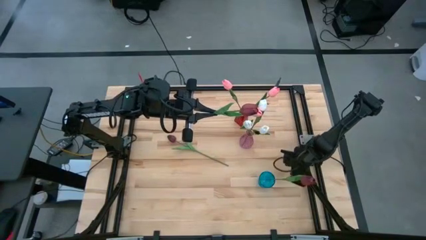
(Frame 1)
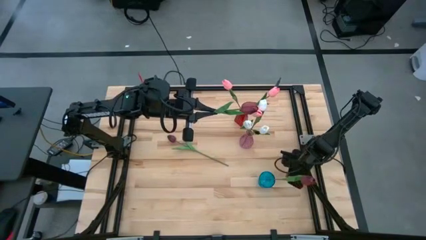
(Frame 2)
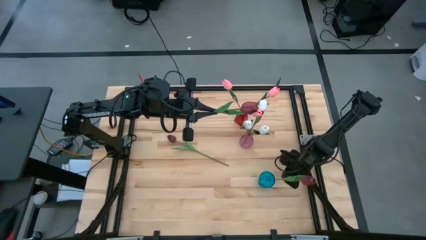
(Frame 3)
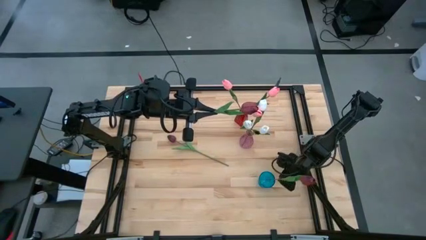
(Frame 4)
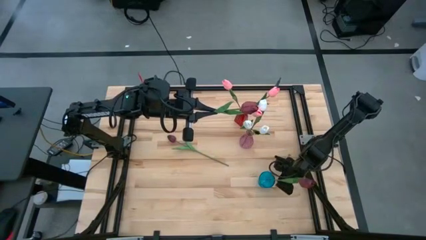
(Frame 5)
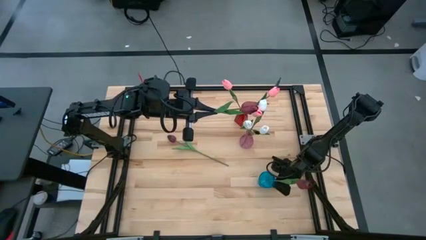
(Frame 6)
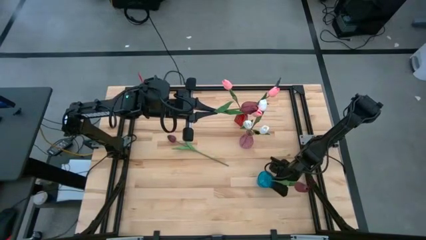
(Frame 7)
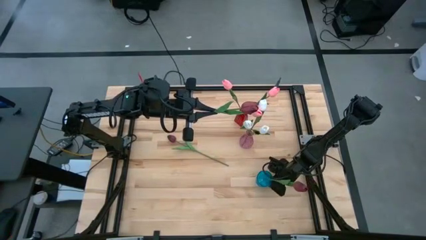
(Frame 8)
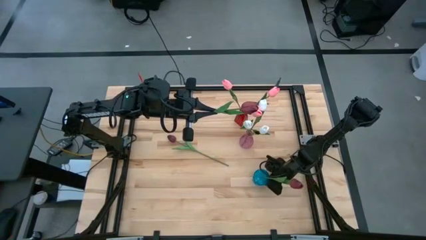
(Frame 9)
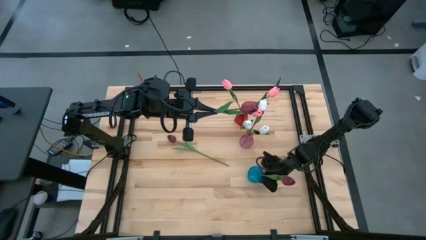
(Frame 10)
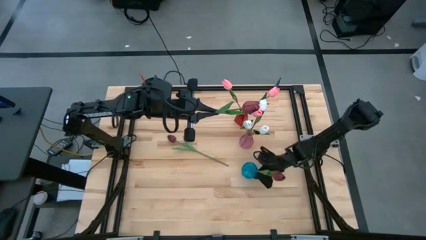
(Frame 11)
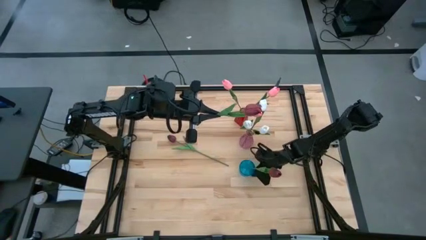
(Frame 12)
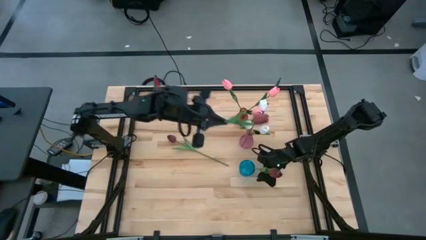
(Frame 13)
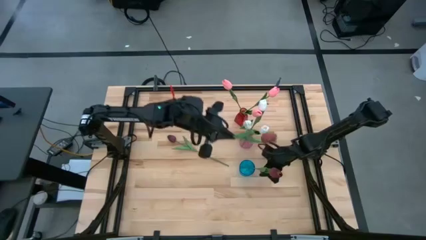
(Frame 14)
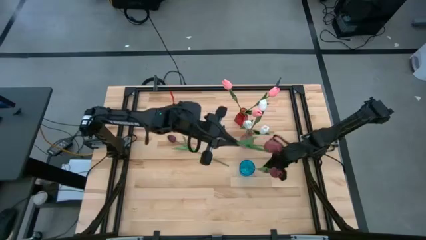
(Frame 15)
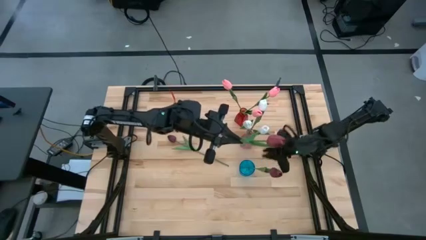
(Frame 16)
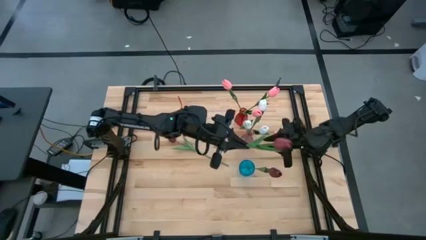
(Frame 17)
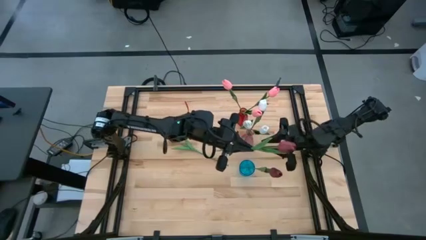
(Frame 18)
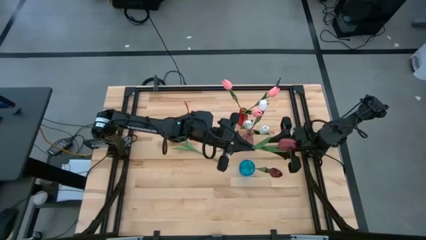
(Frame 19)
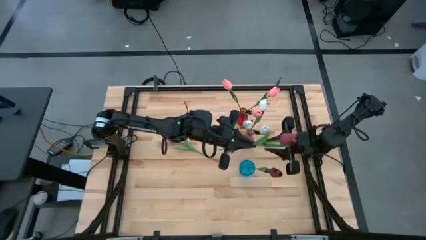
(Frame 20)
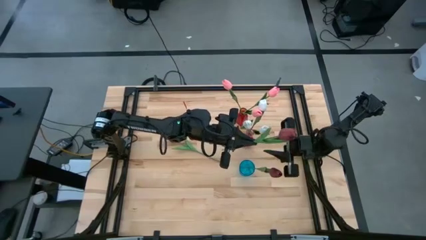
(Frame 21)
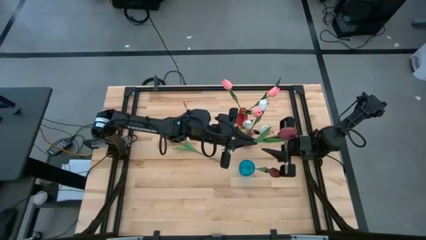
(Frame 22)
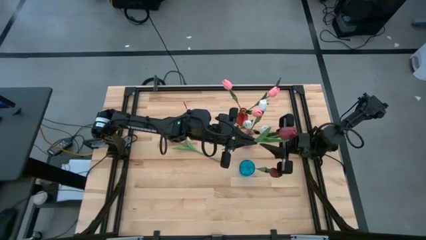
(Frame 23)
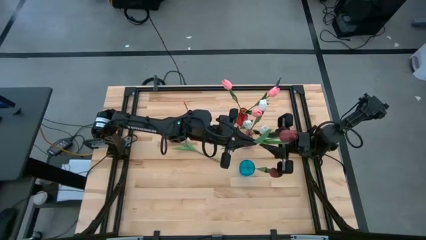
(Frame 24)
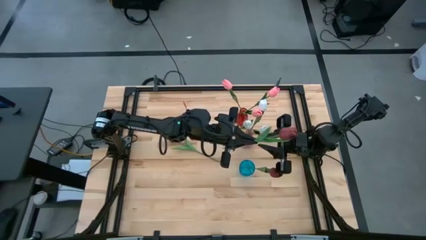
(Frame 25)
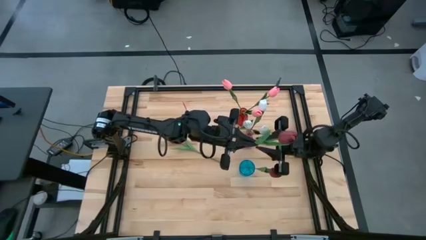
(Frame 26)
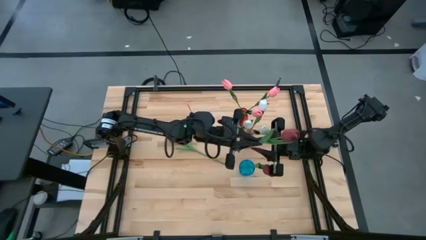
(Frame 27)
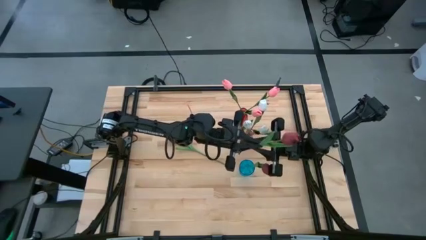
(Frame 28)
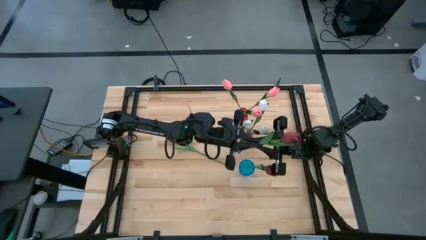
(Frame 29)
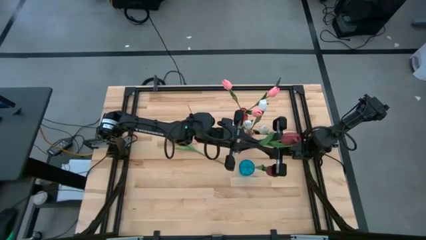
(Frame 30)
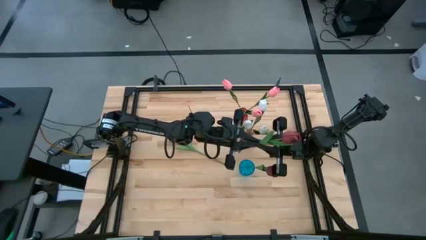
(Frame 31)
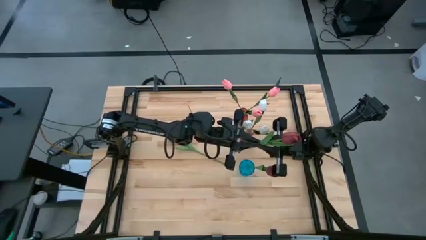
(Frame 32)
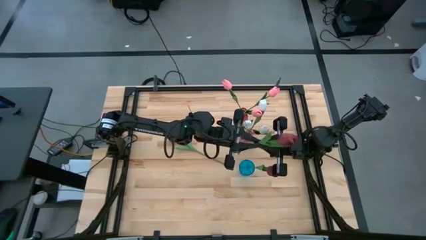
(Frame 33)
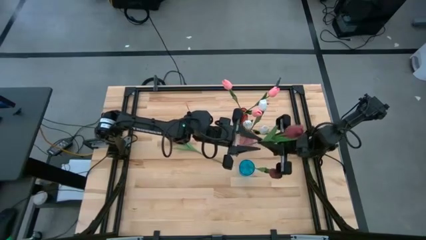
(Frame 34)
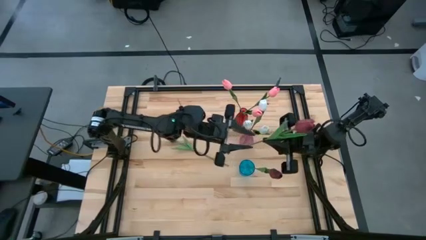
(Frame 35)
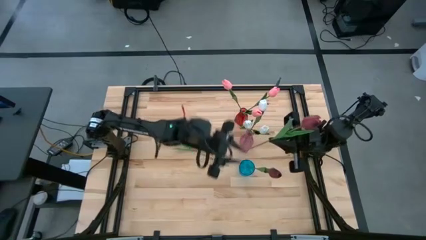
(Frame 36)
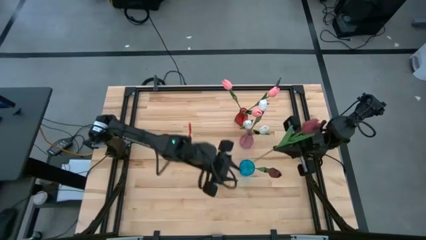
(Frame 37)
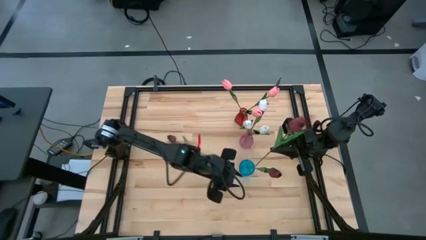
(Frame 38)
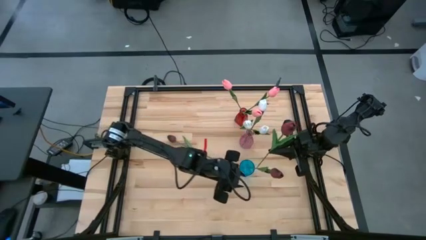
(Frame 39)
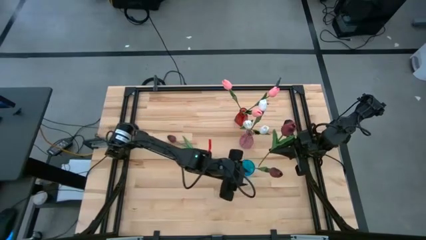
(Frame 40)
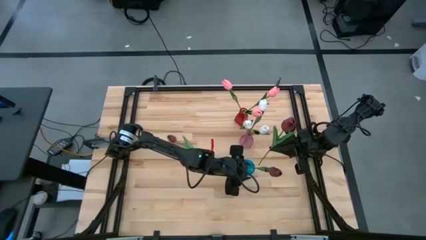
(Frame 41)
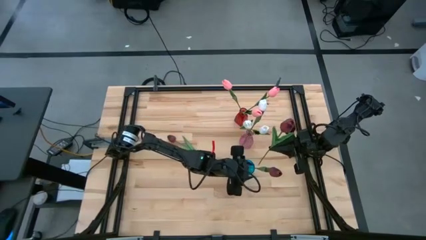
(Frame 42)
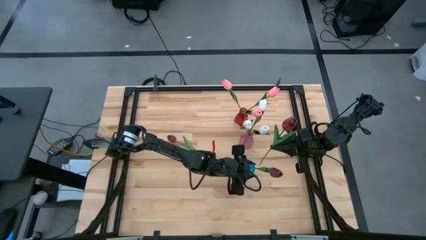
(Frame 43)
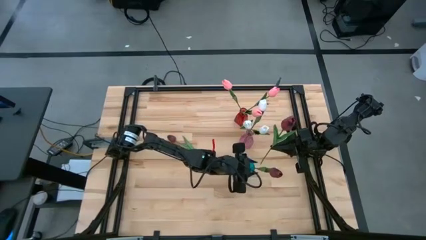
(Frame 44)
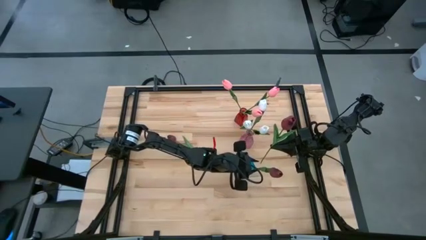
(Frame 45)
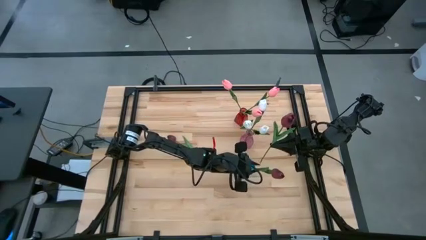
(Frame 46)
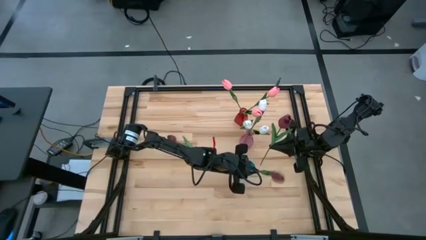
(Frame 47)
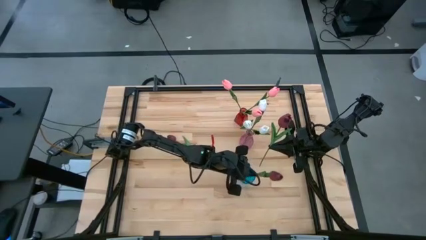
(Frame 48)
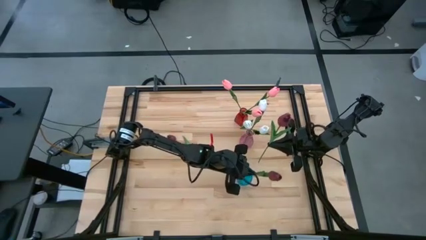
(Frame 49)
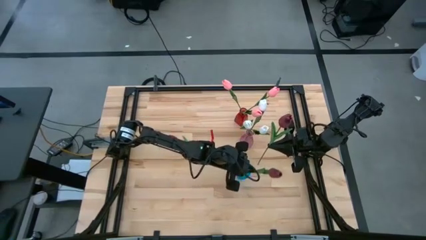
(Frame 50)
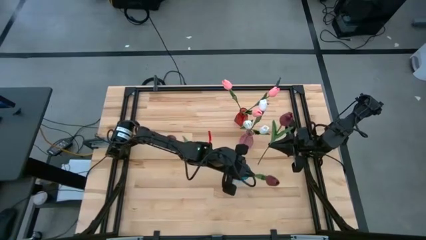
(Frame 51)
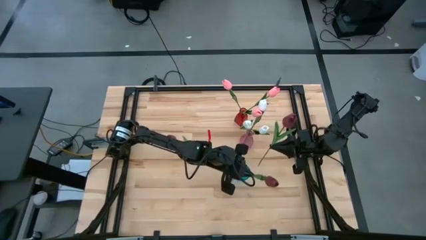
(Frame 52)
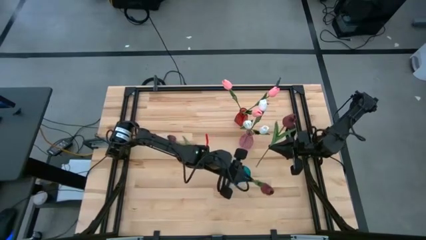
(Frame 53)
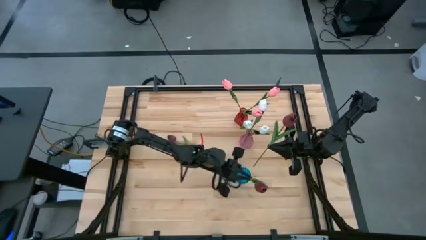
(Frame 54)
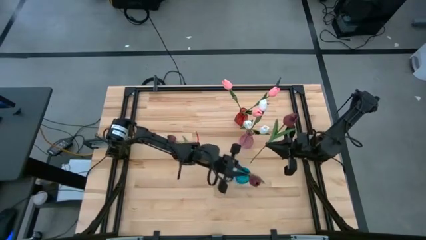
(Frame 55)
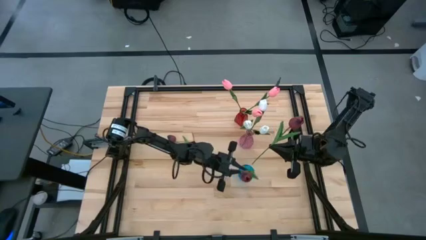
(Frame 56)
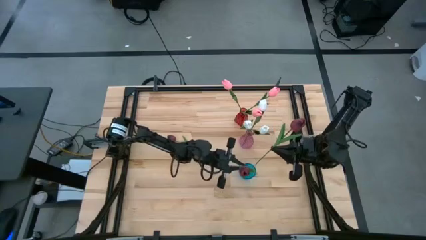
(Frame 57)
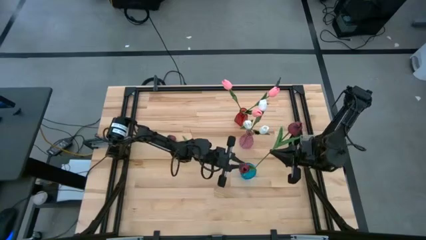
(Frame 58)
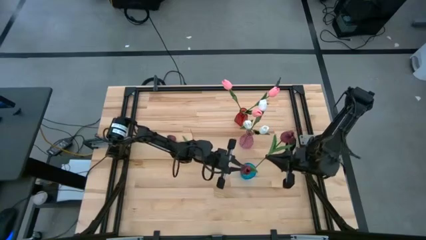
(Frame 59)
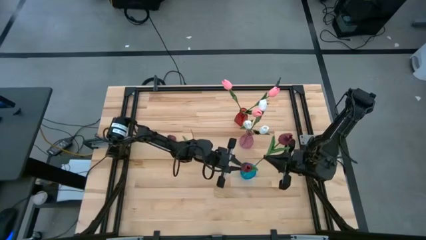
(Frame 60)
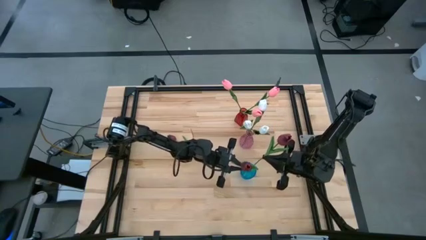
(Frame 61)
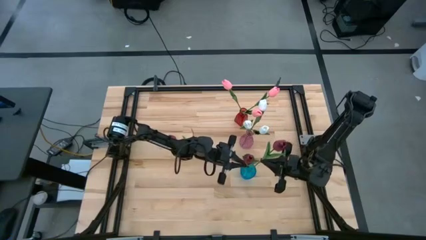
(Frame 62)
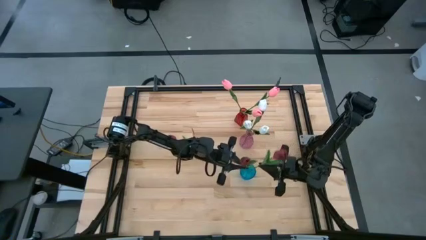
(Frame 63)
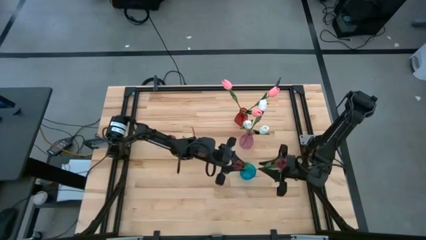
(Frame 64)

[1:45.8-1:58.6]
Task: Sort flowers into vase by color
Put the right red tulip into the blue vase

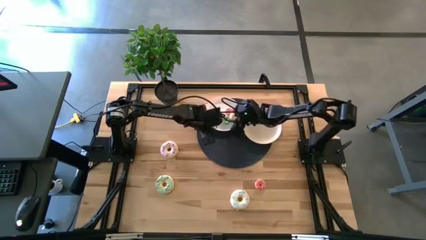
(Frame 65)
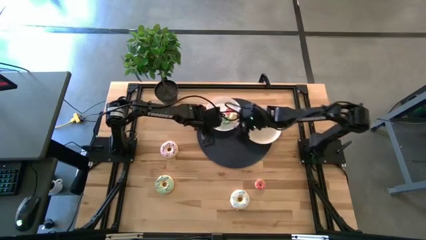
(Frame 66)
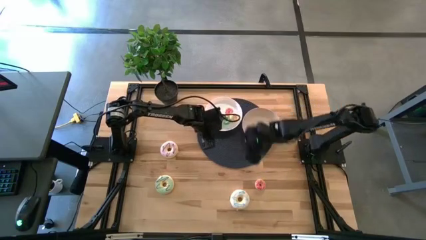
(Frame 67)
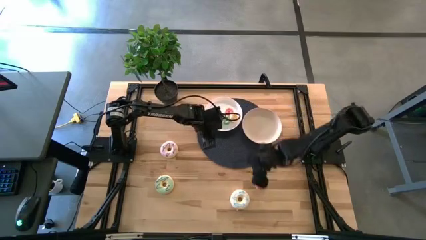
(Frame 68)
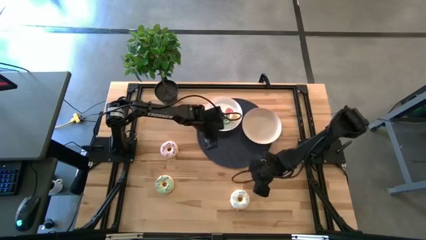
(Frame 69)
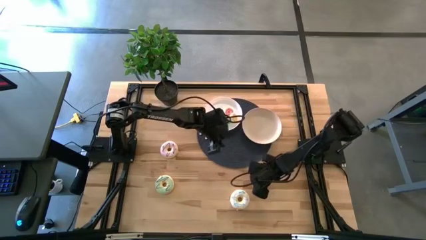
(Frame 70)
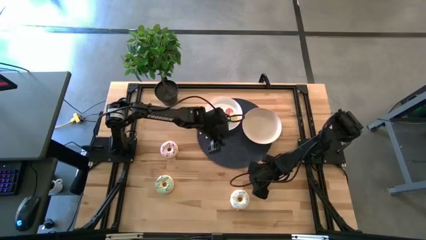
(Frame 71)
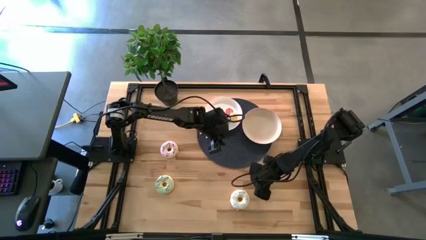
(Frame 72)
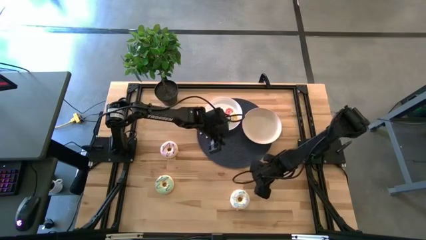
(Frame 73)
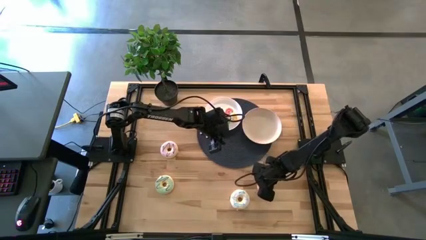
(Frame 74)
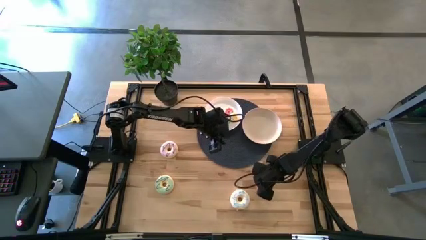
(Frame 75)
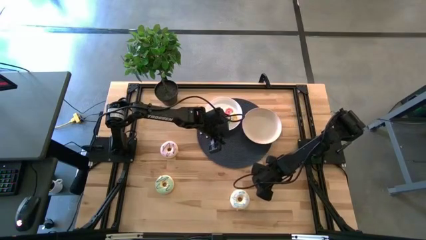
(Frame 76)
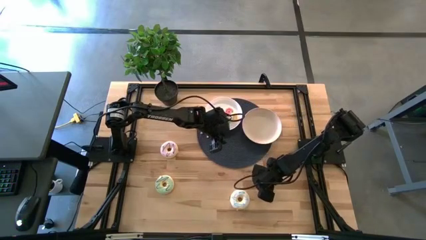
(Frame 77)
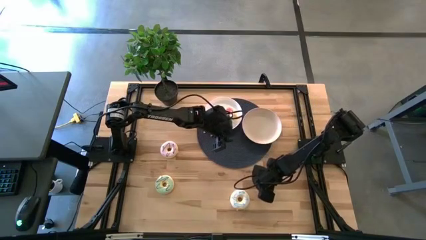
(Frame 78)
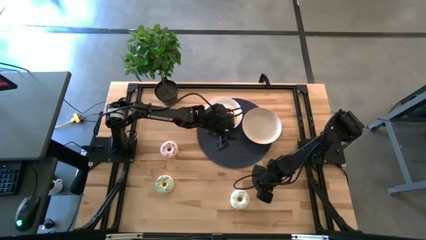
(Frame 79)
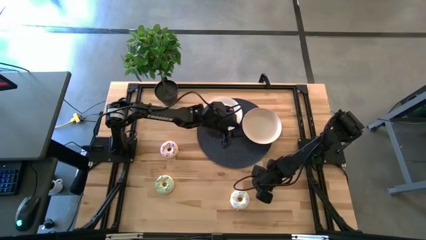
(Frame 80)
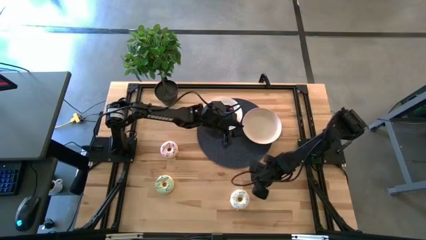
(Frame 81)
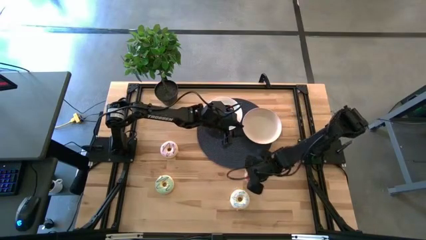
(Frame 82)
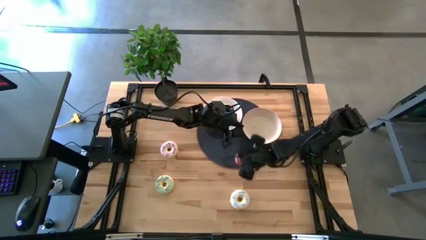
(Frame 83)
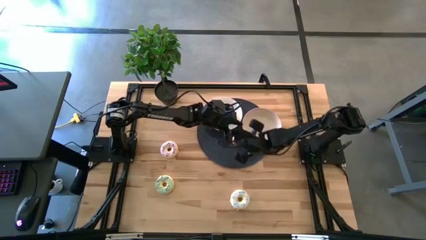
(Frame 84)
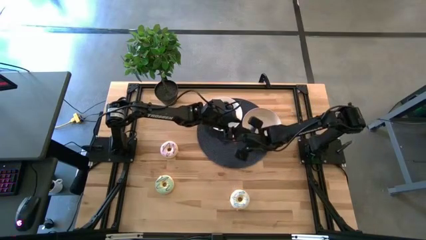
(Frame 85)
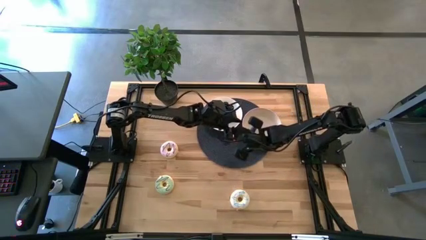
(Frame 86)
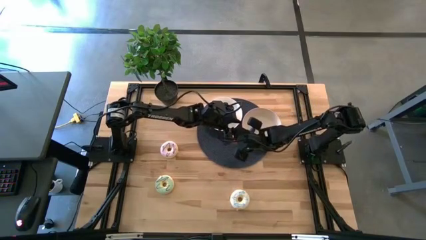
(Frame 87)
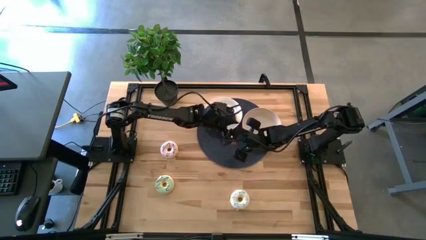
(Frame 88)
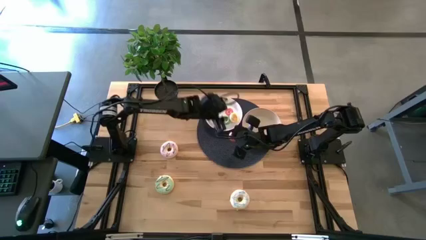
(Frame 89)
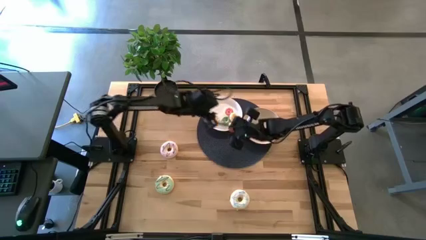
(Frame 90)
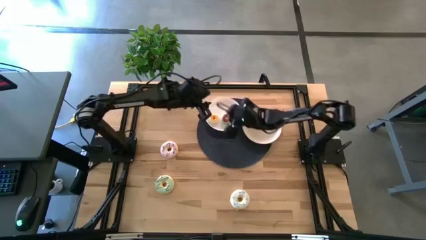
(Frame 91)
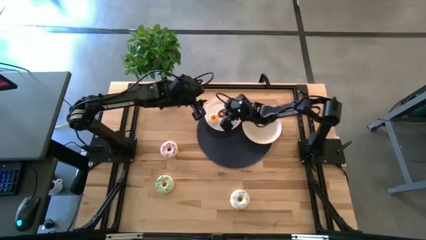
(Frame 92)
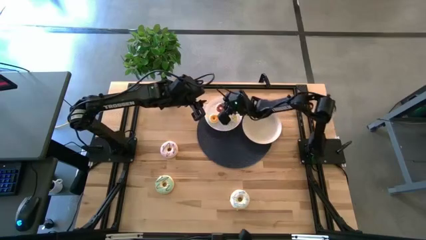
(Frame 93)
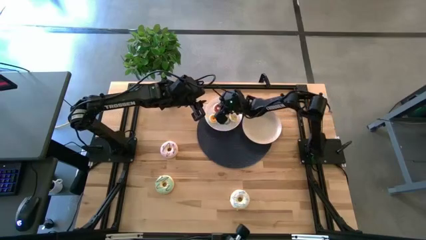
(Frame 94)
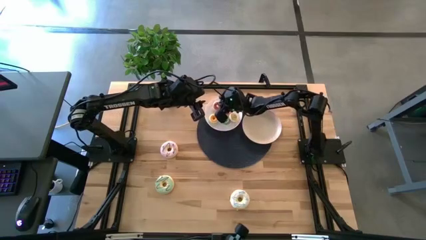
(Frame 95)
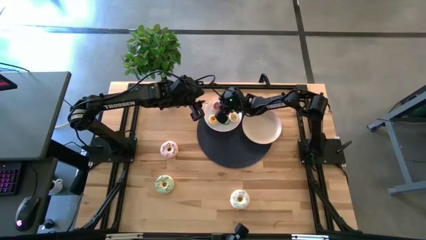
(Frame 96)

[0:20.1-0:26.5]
Task: Pick & Place donuts
Put the small pink donut on the white plate
